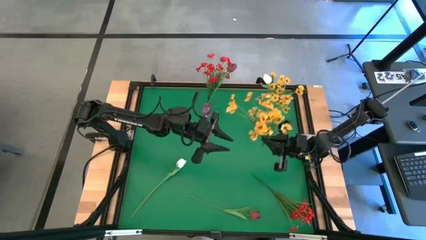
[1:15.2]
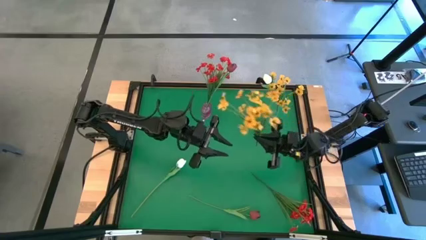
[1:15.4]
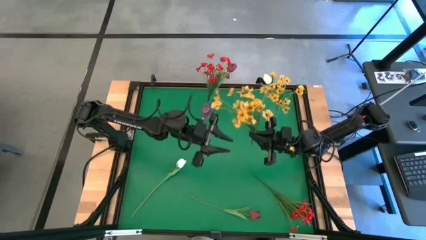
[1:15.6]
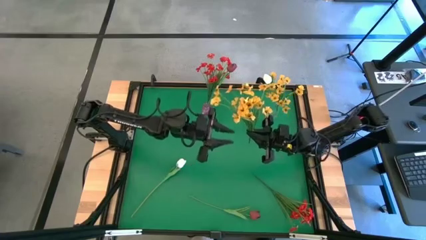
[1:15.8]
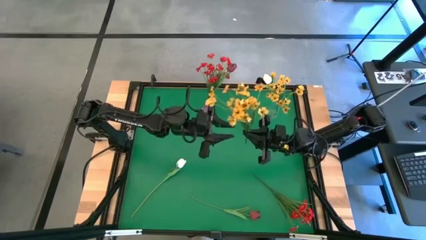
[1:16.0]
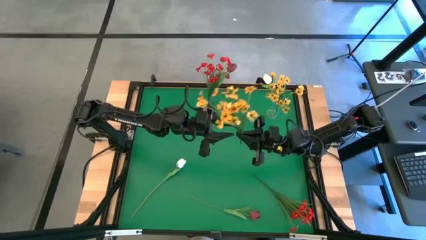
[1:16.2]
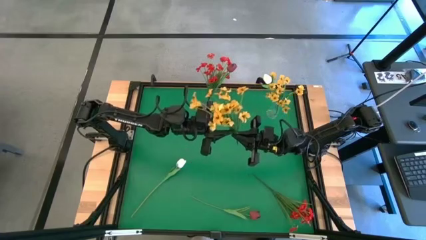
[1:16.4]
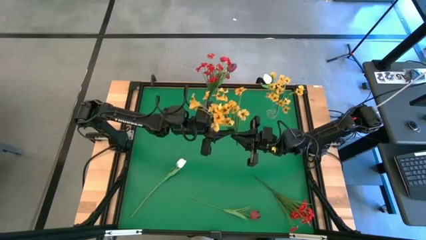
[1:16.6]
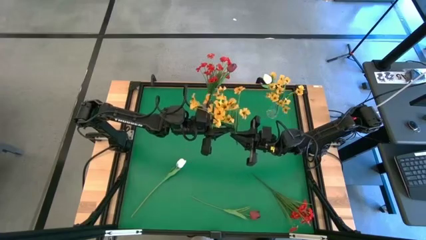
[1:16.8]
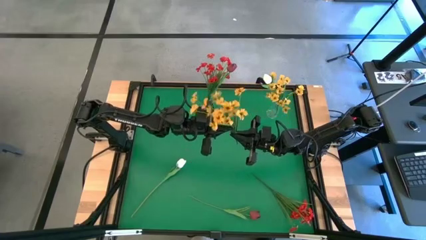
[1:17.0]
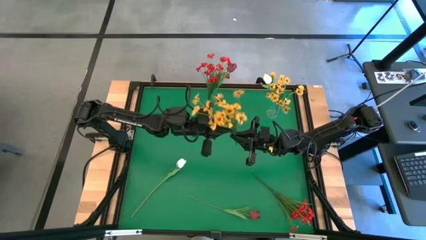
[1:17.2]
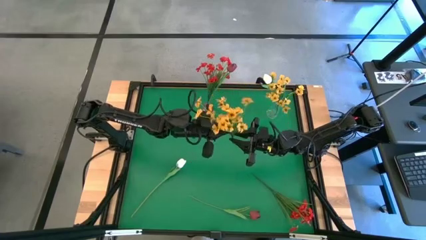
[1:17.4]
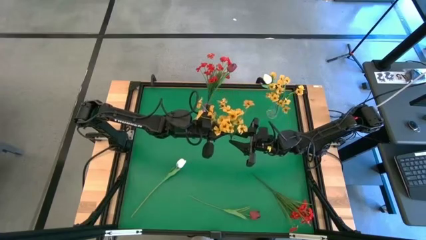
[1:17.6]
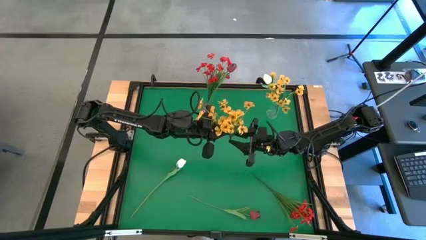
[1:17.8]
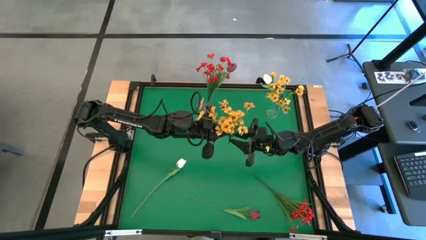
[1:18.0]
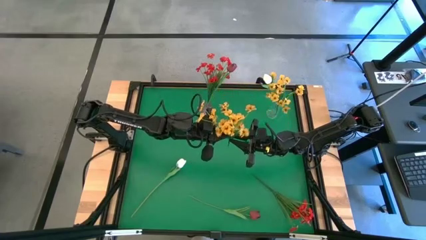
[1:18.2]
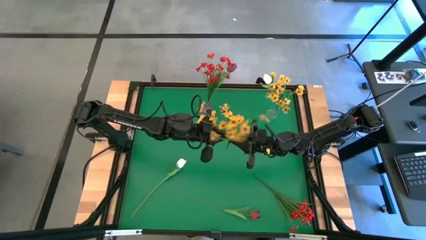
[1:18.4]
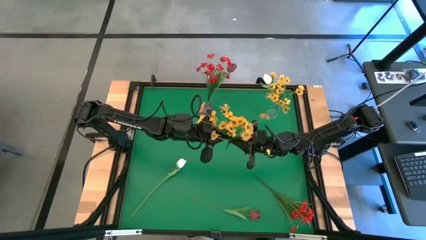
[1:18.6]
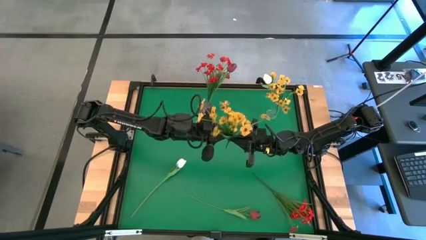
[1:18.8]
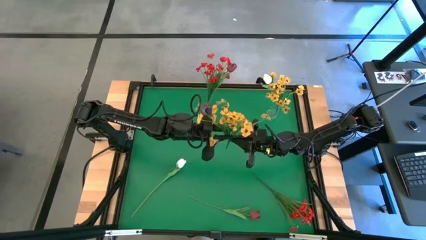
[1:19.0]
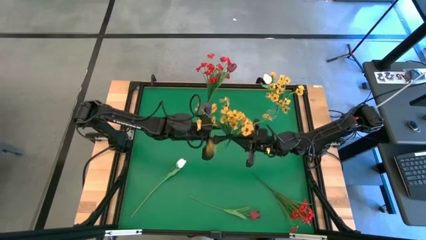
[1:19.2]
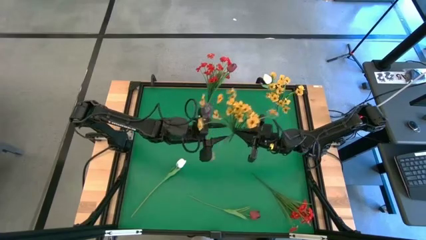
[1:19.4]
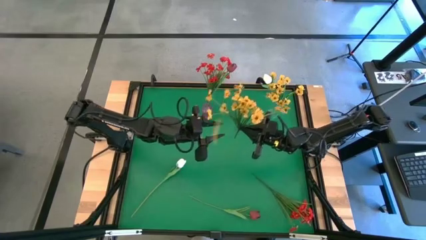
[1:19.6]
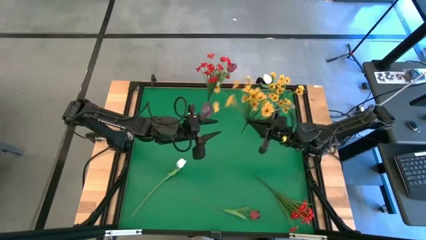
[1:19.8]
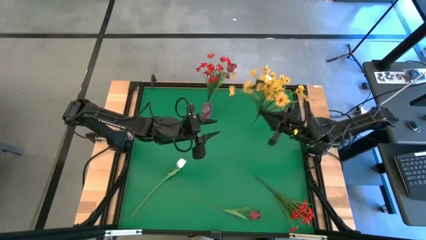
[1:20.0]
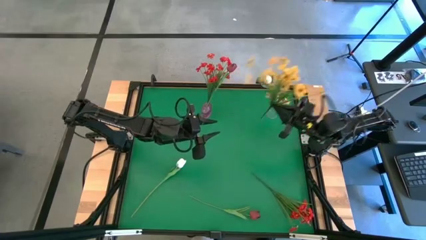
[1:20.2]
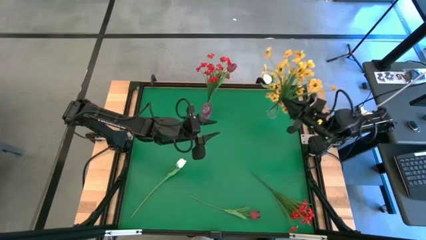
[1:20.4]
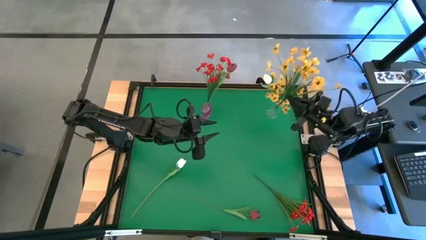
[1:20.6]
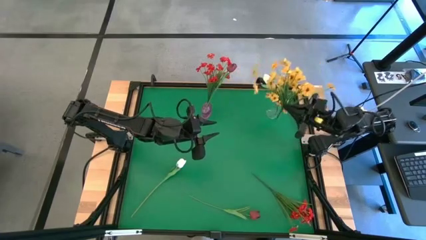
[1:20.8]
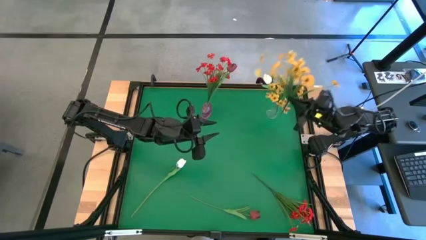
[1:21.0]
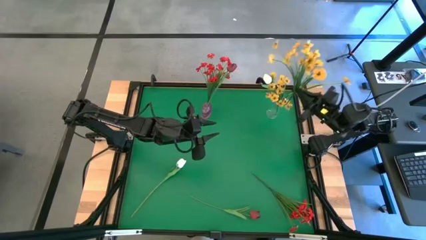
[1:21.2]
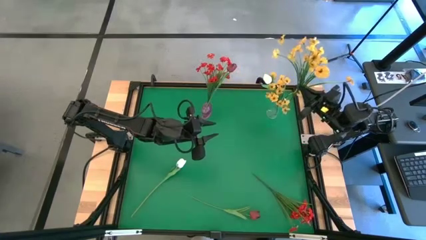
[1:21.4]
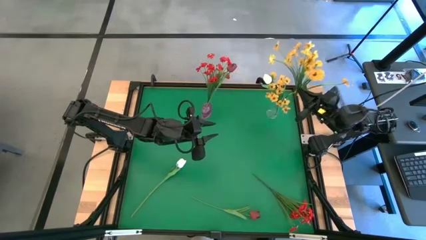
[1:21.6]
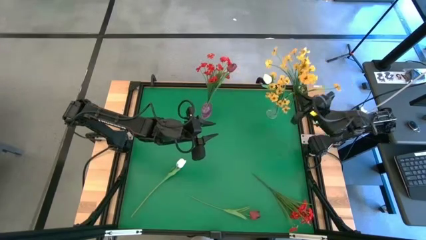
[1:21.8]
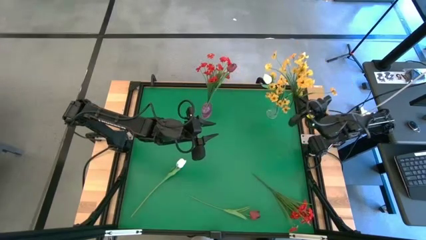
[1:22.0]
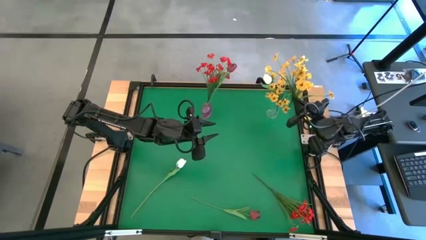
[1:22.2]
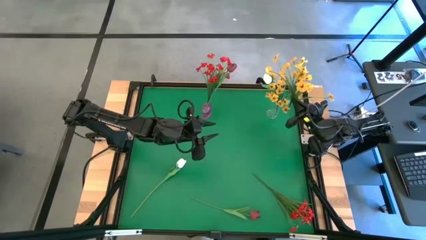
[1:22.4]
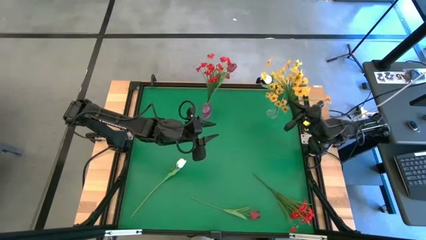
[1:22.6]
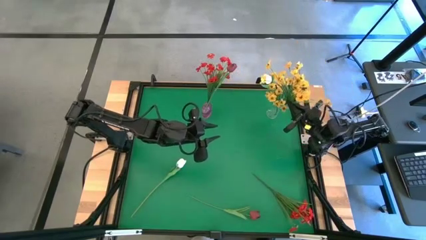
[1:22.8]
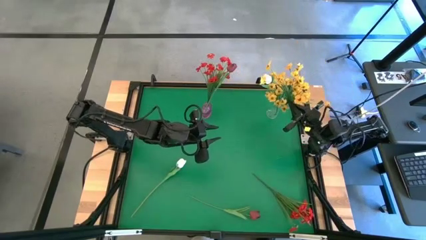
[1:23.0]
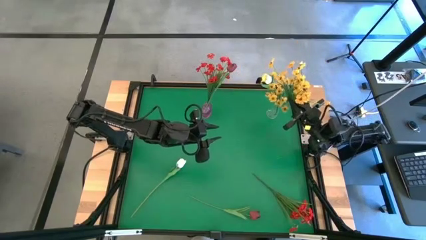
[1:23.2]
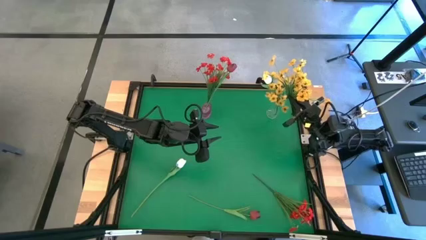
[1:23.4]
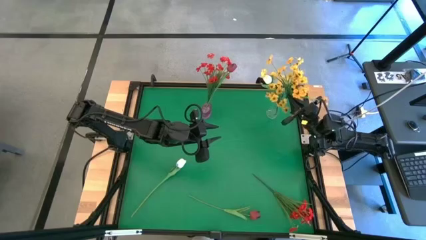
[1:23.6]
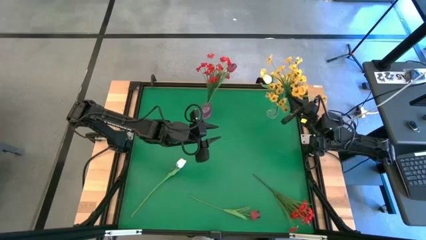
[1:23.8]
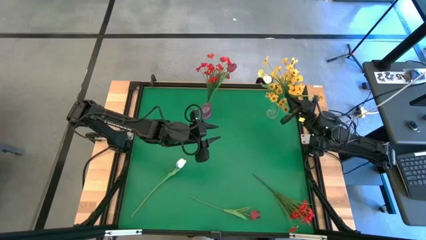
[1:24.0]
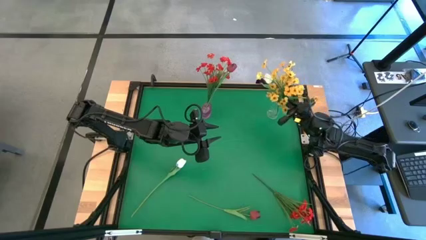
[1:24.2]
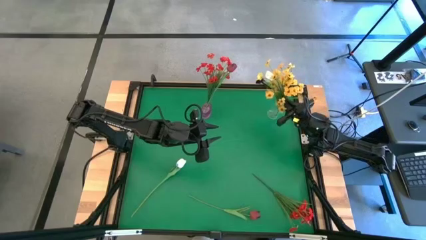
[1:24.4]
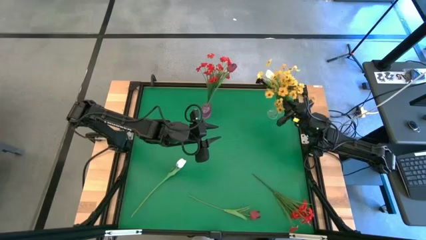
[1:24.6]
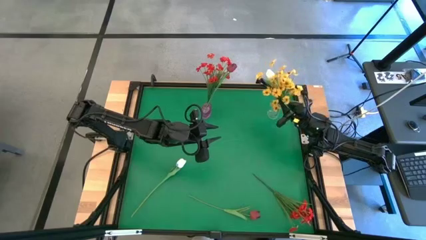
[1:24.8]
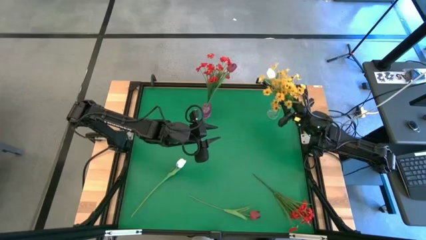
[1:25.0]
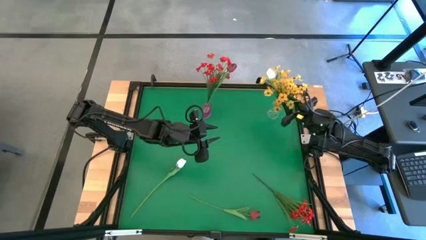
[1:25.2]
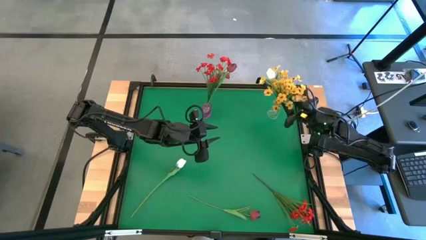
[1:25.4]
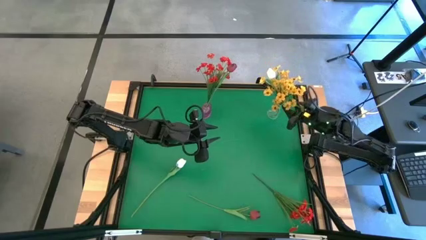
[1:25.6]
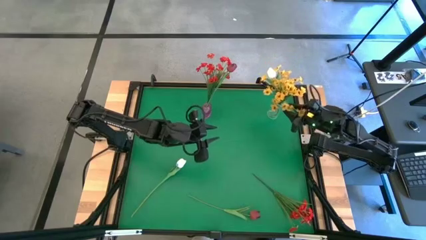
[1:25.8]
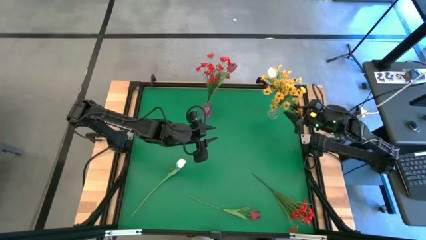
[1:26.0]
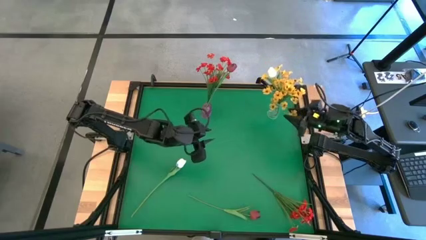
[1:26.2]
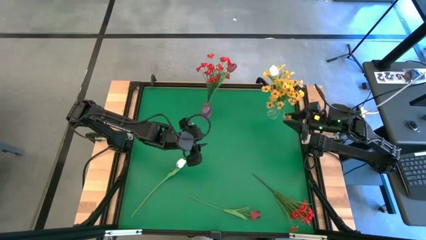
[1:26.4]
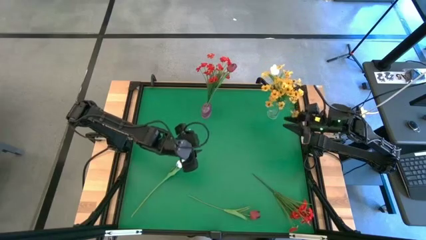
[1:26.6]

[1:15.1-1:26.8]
Task: Sort flowers into vase by color
Put the yellow flowers into the transparent vase

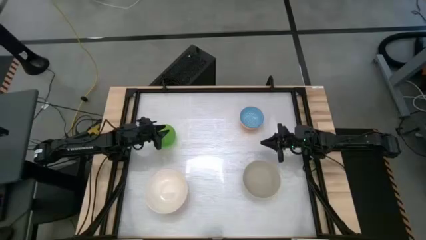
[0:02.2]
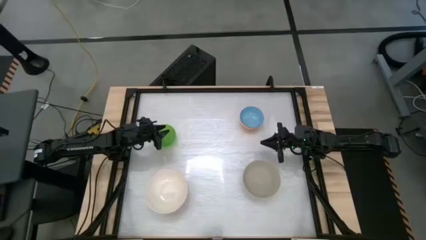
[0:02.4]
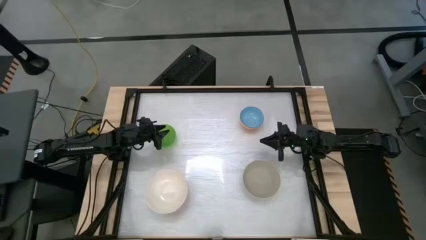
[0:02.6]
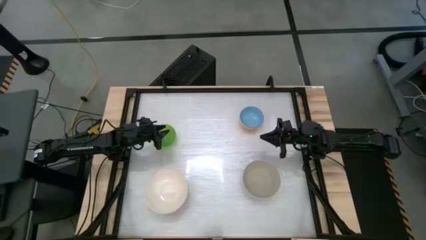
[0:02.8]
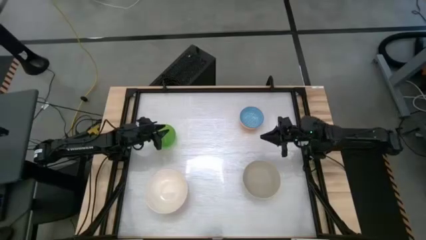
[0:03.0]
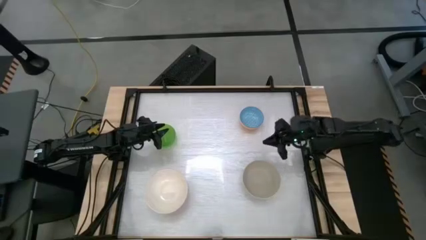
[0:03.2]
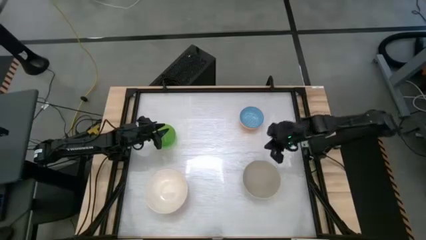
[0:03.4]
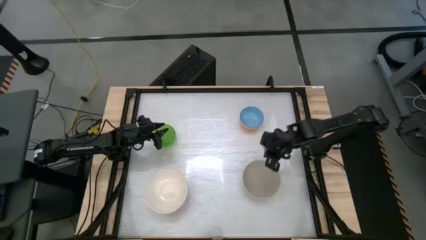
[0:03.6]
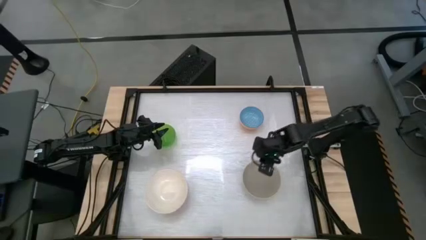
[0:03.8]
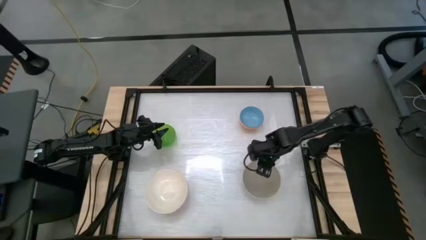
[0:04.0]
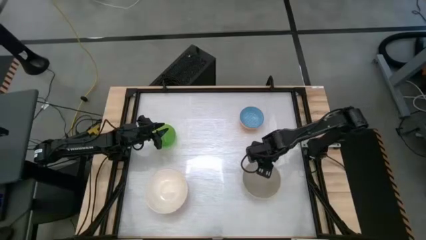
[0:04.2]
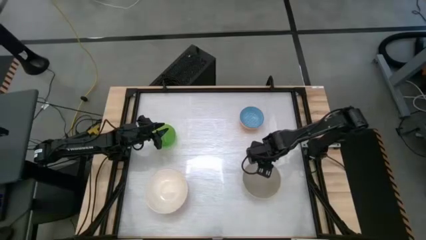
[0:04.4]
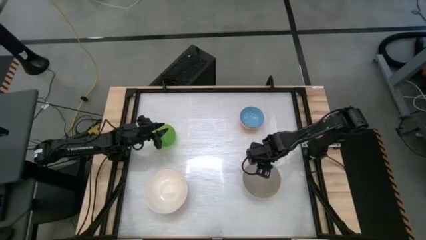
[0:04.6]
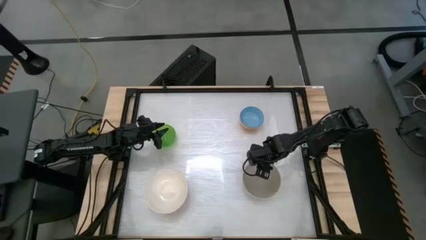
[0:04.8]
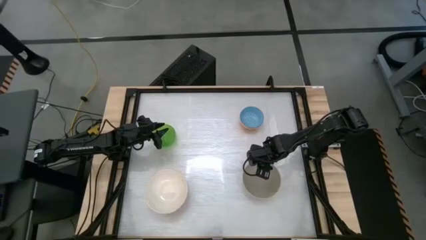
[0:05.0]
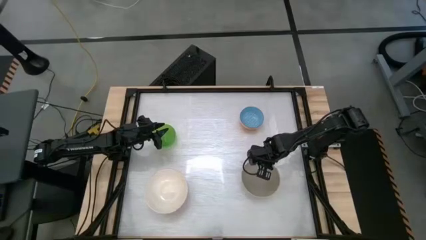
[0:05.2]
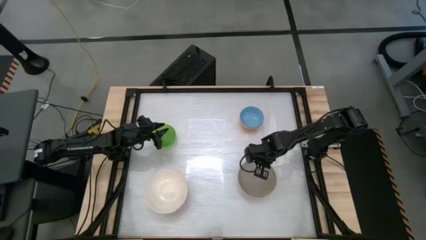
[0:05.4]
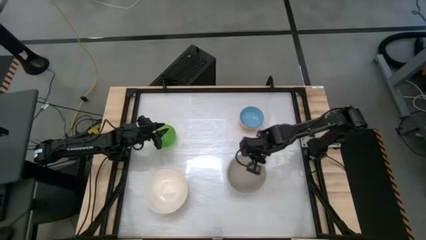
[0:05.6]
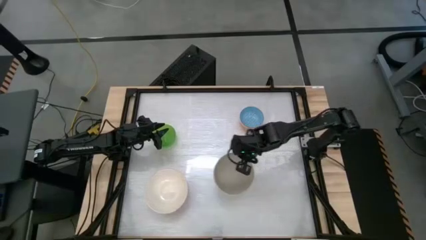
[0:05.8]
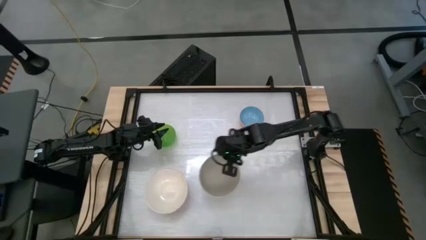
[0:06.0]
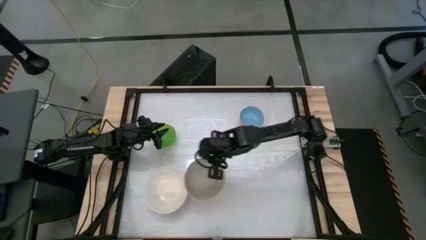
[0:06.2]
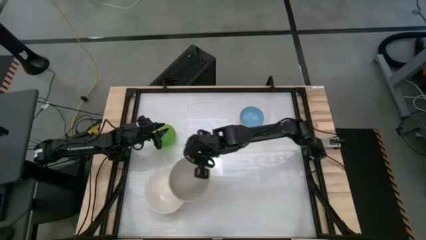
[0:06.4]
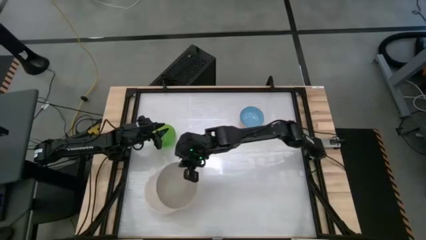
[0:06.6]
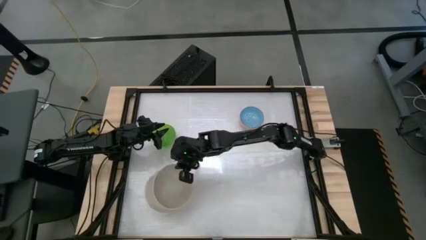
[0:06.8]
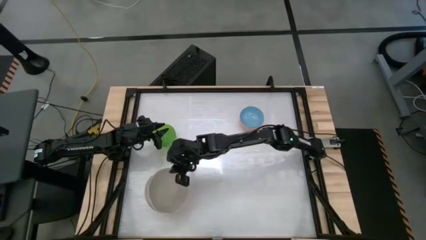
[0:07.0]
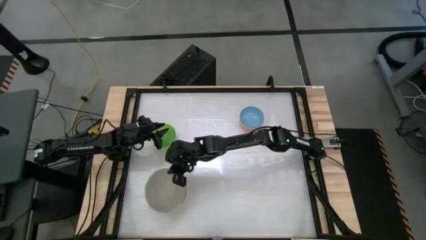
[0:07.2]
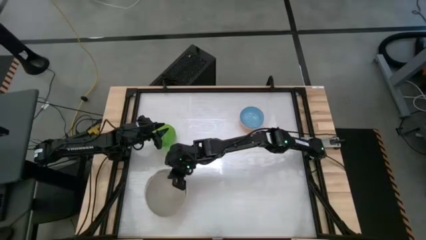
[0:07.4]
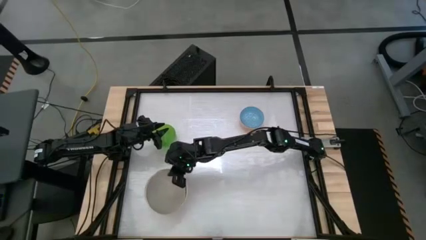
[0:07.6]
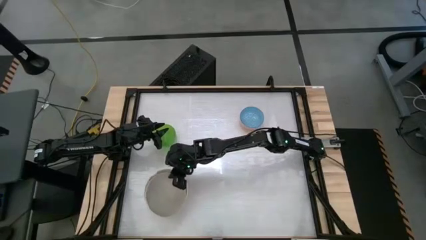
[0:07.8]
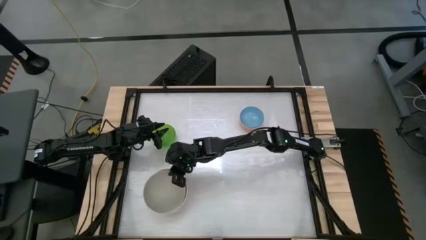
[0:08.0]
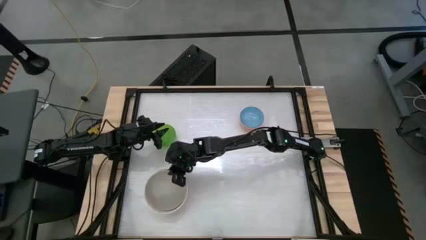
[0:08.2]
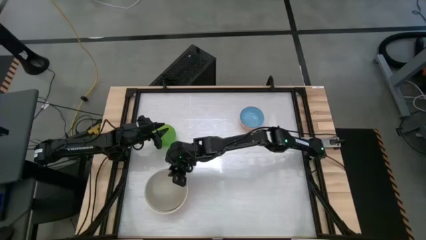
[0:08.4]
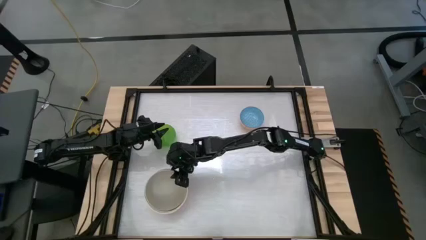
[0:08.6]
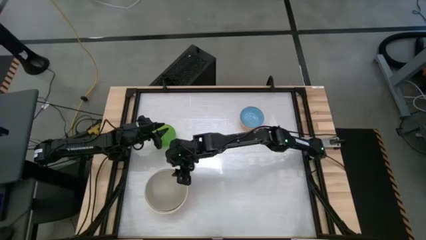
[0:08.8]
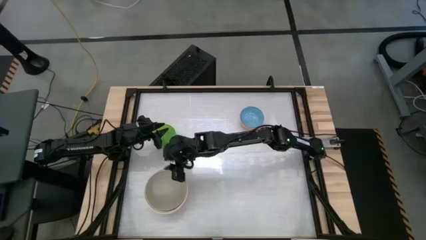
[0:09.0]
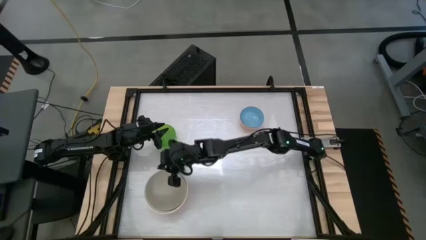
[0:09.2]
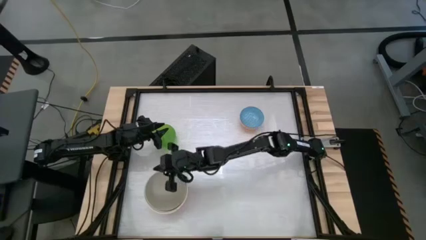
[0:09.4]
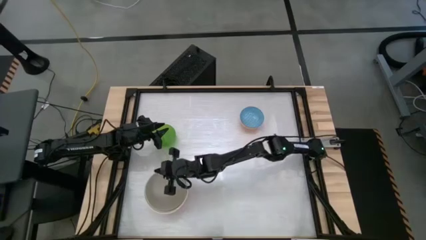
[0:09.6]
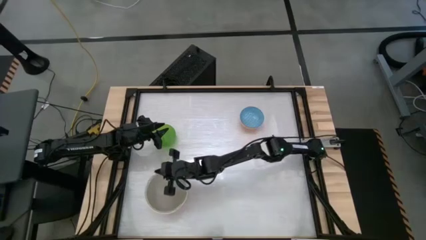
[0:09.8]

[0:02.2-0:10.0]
Task: Nest bowls inside each other by size order
Stack the gray bowl on top of the white bowl
